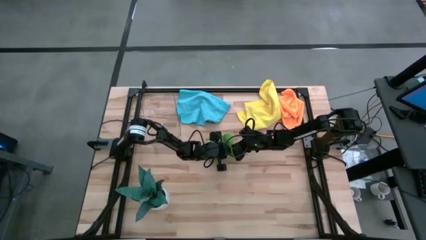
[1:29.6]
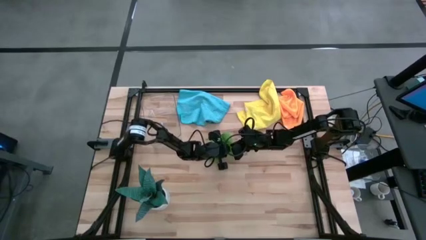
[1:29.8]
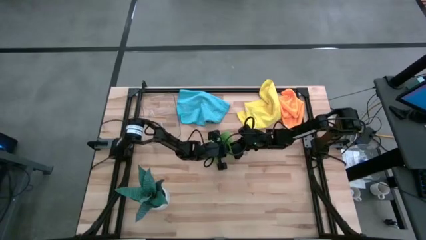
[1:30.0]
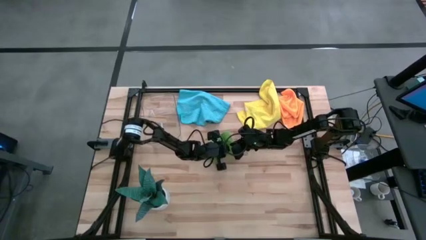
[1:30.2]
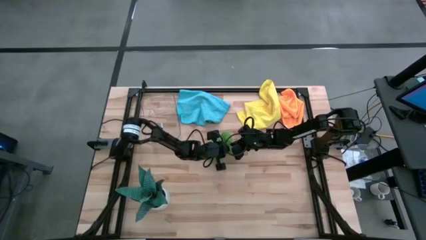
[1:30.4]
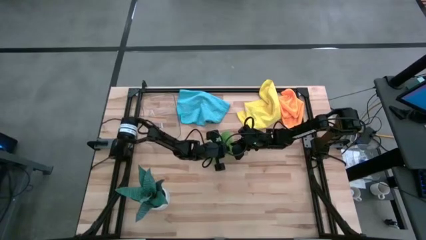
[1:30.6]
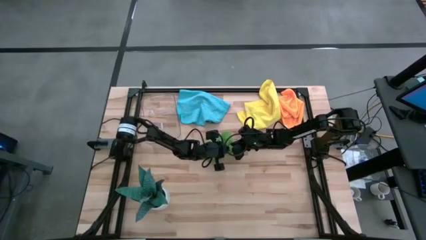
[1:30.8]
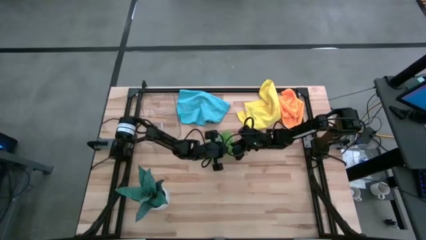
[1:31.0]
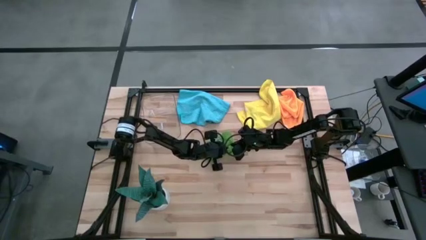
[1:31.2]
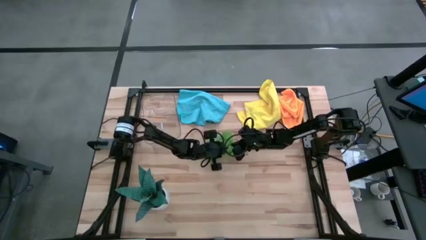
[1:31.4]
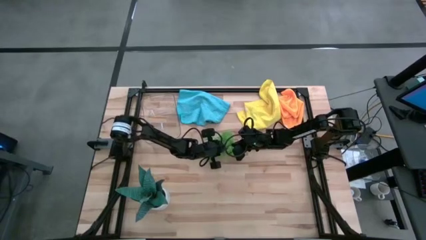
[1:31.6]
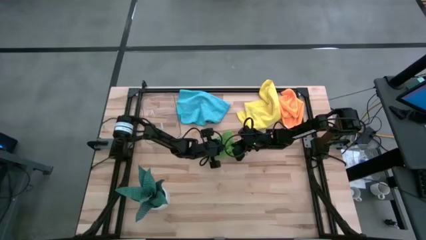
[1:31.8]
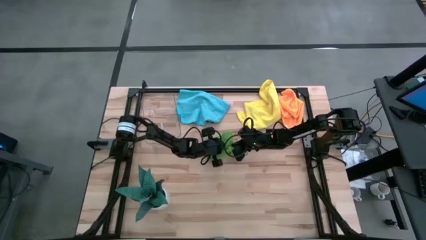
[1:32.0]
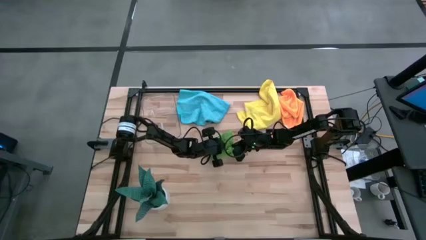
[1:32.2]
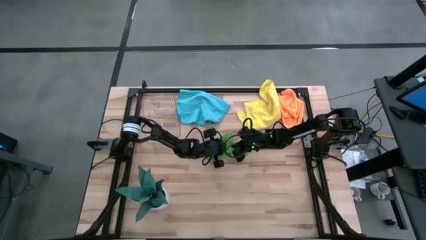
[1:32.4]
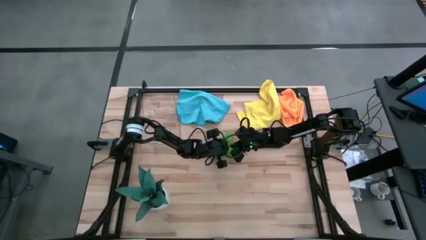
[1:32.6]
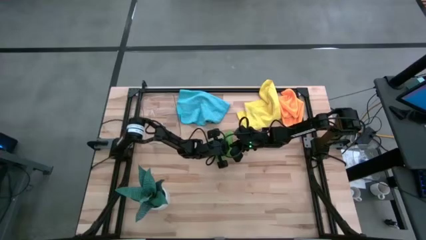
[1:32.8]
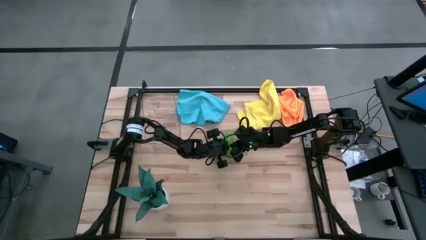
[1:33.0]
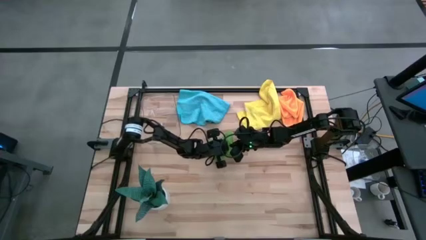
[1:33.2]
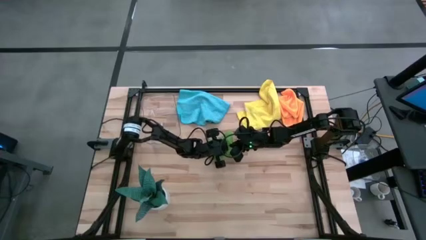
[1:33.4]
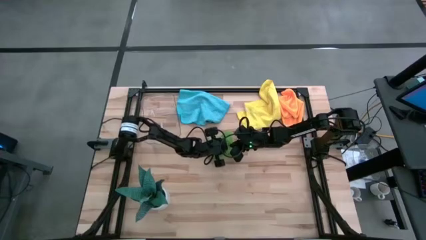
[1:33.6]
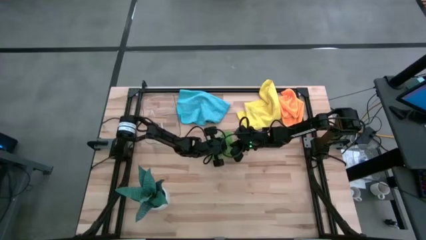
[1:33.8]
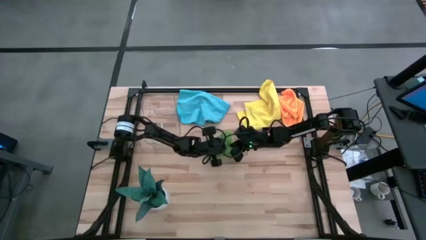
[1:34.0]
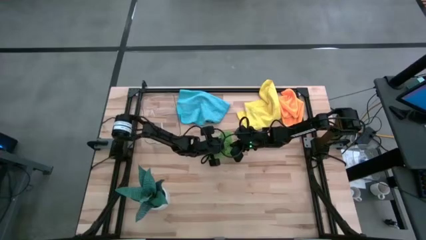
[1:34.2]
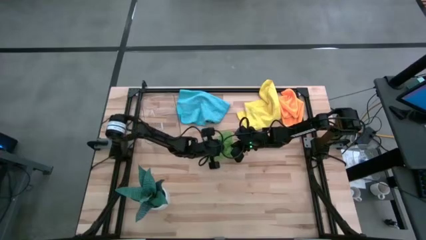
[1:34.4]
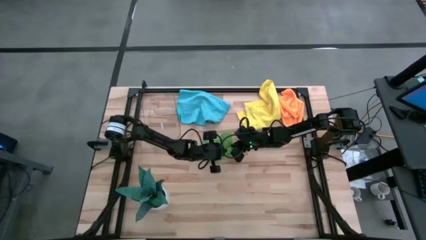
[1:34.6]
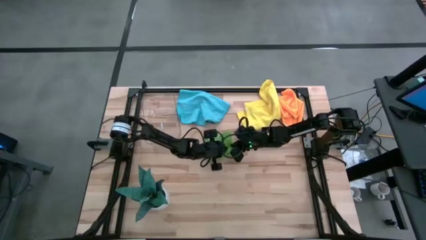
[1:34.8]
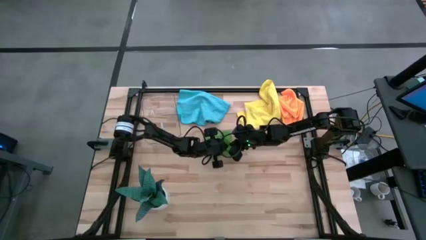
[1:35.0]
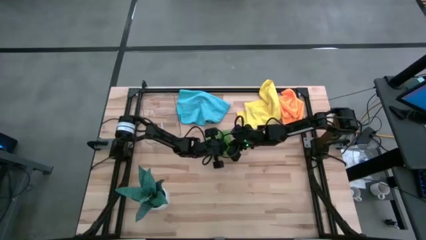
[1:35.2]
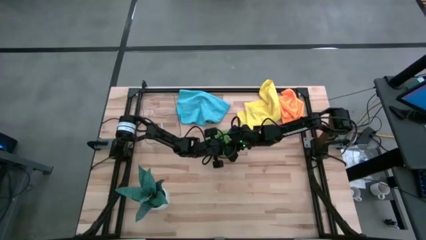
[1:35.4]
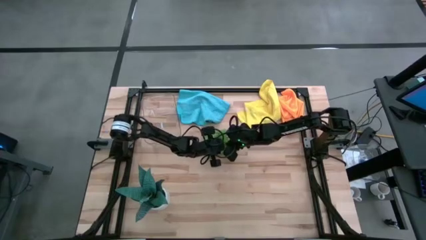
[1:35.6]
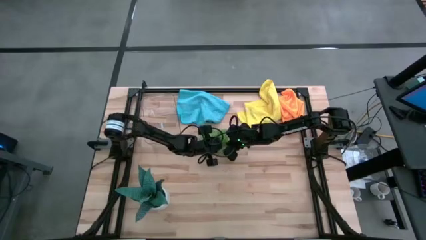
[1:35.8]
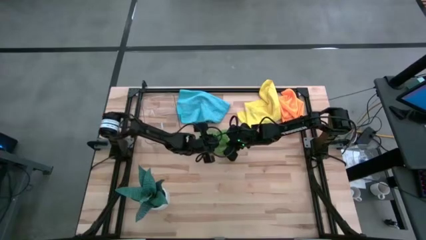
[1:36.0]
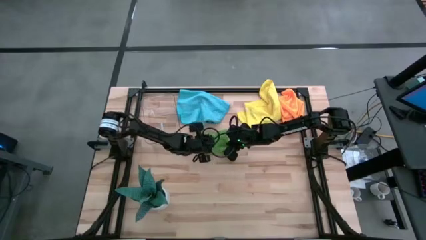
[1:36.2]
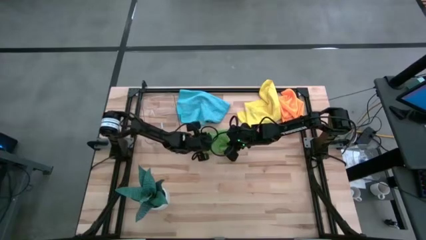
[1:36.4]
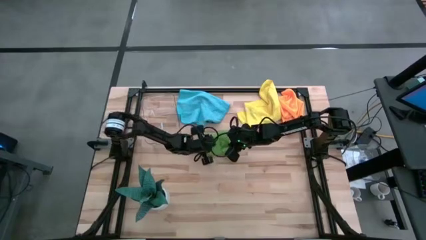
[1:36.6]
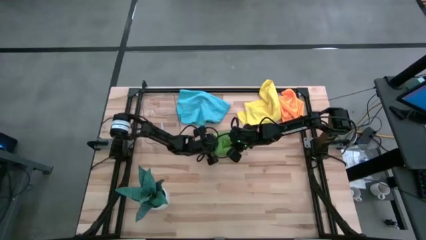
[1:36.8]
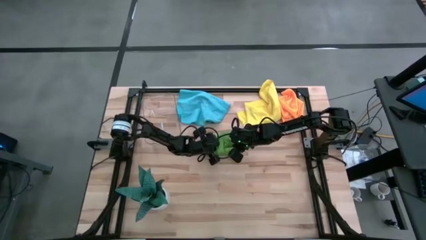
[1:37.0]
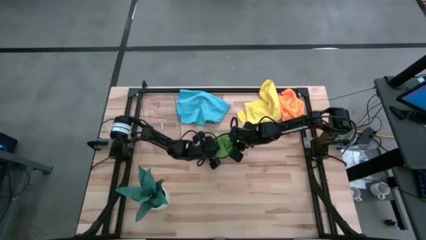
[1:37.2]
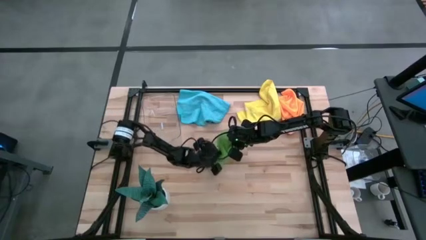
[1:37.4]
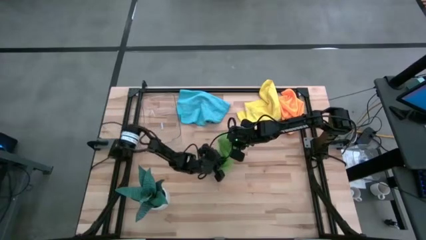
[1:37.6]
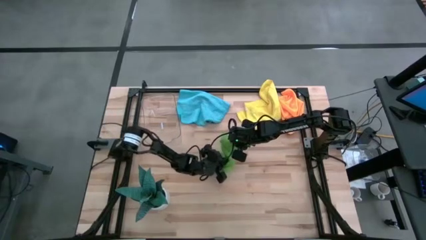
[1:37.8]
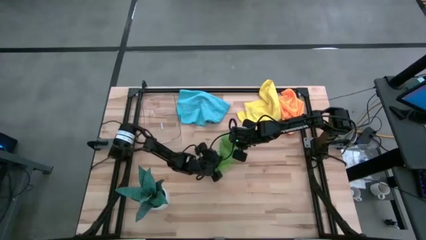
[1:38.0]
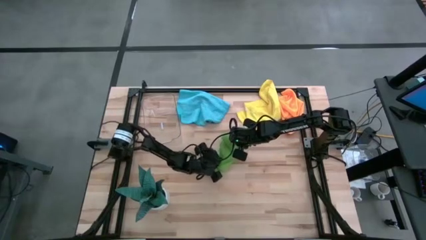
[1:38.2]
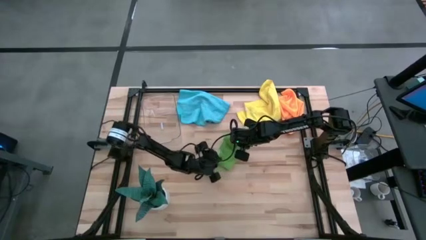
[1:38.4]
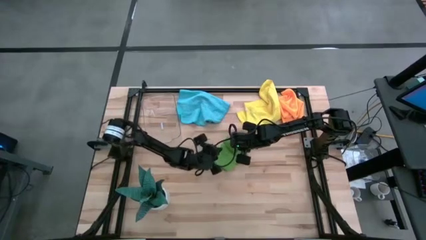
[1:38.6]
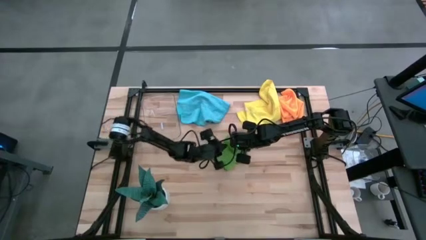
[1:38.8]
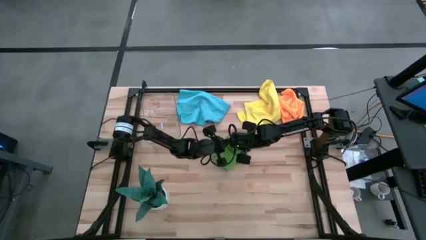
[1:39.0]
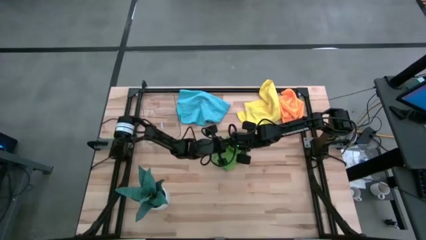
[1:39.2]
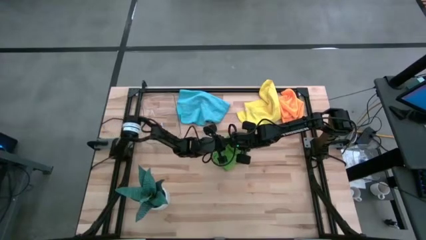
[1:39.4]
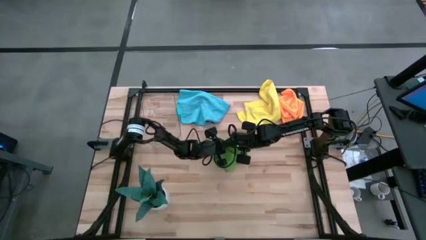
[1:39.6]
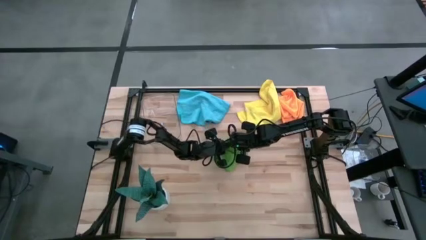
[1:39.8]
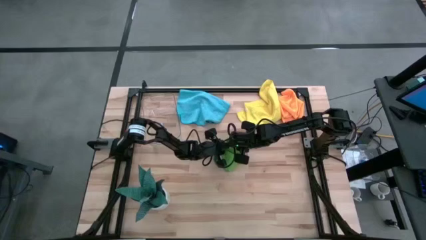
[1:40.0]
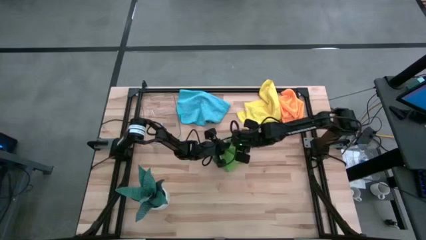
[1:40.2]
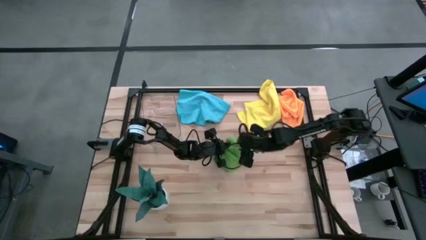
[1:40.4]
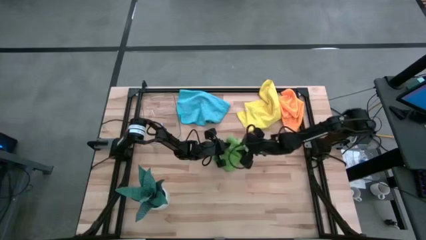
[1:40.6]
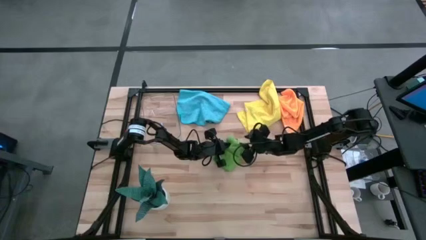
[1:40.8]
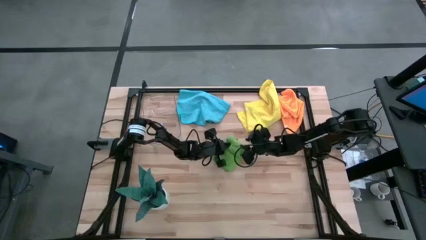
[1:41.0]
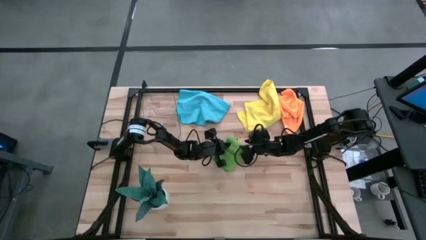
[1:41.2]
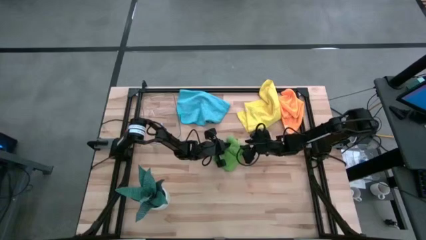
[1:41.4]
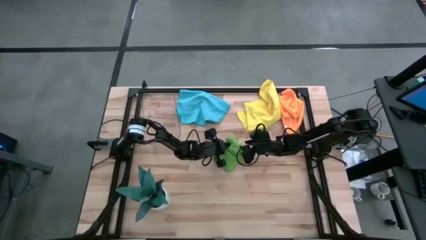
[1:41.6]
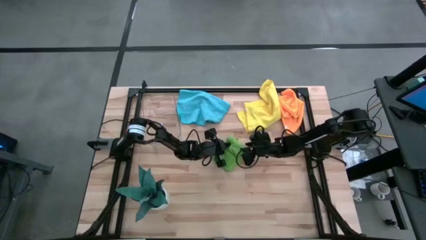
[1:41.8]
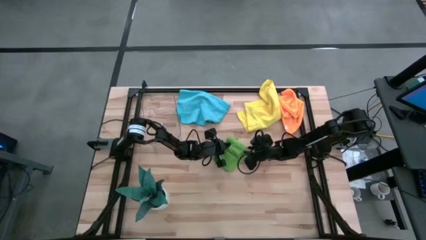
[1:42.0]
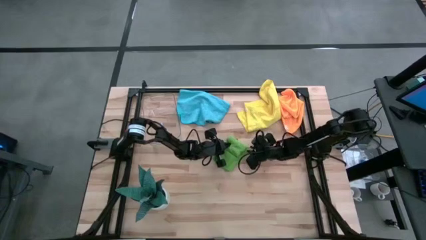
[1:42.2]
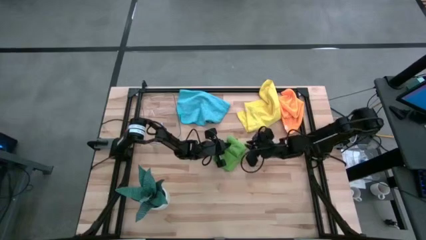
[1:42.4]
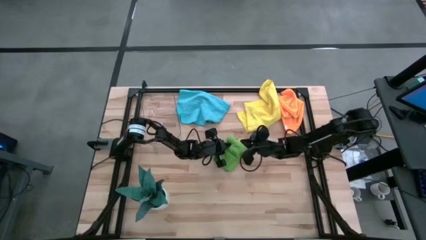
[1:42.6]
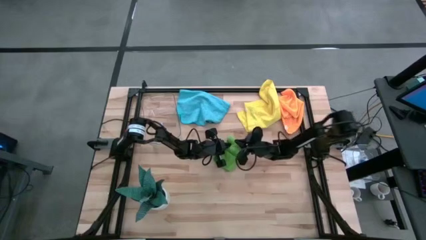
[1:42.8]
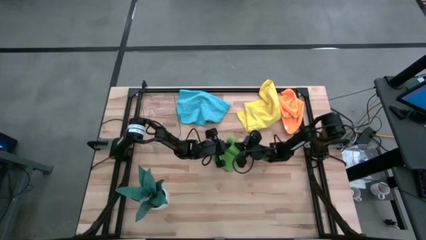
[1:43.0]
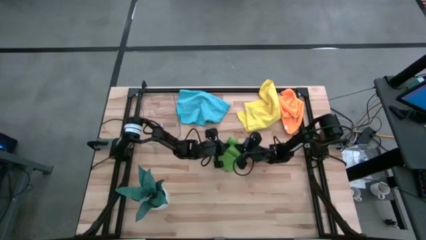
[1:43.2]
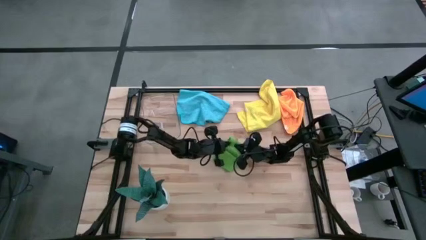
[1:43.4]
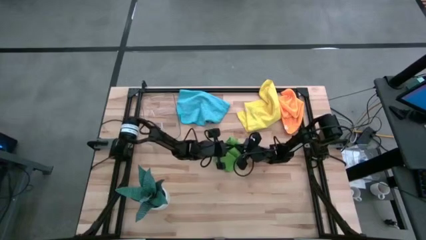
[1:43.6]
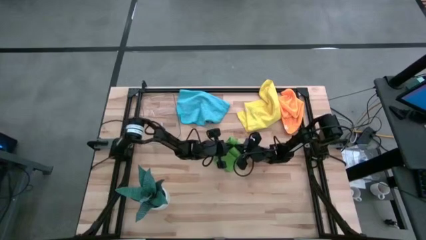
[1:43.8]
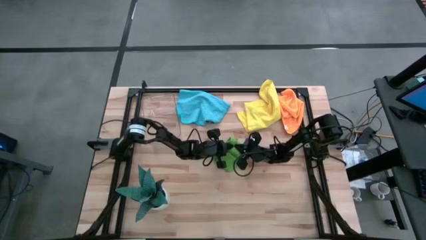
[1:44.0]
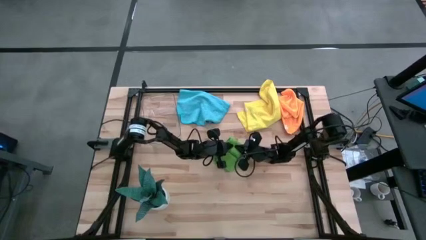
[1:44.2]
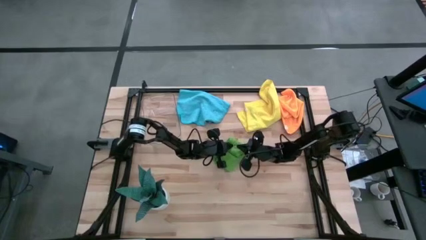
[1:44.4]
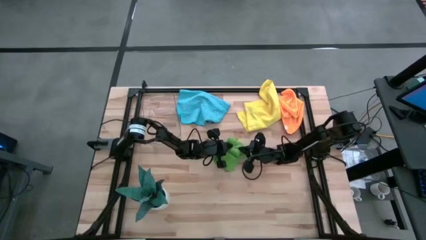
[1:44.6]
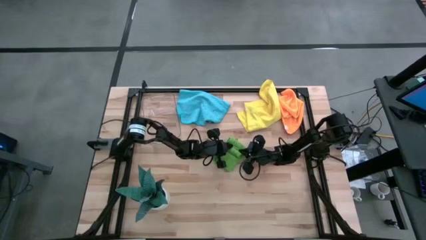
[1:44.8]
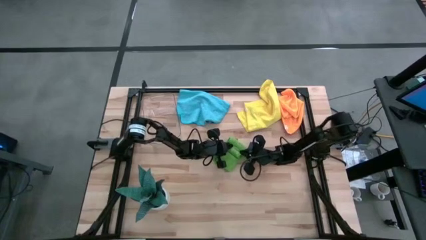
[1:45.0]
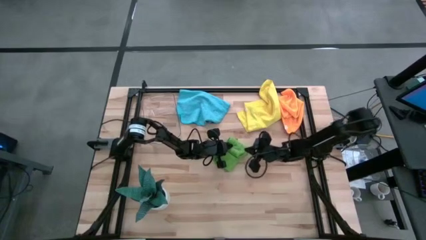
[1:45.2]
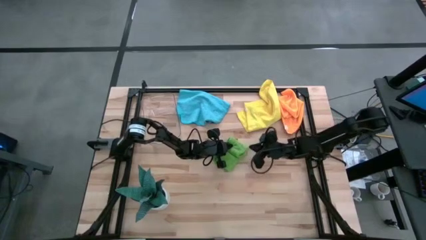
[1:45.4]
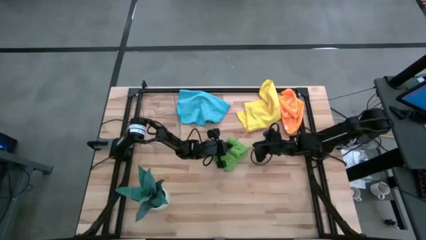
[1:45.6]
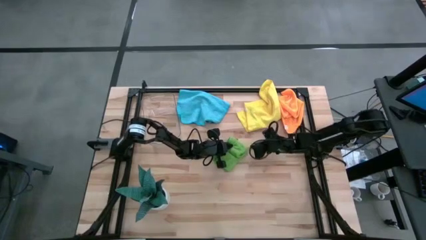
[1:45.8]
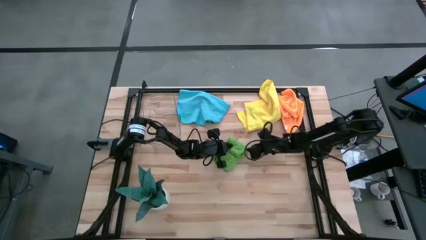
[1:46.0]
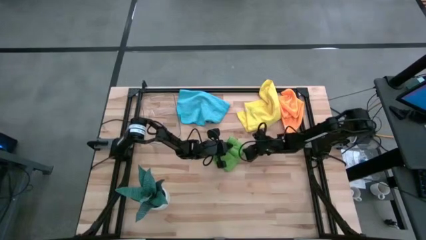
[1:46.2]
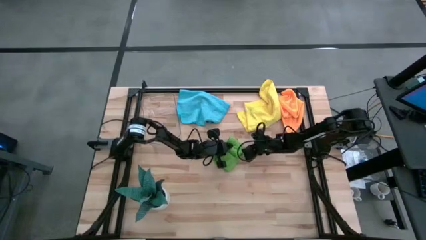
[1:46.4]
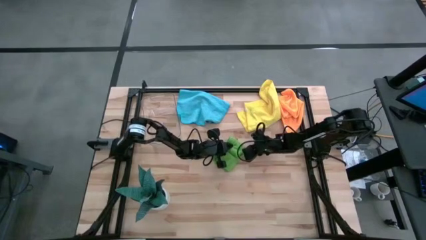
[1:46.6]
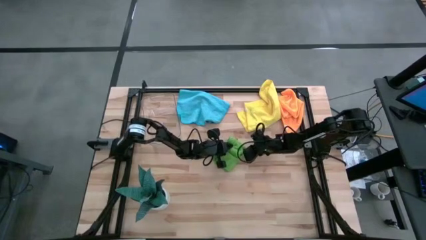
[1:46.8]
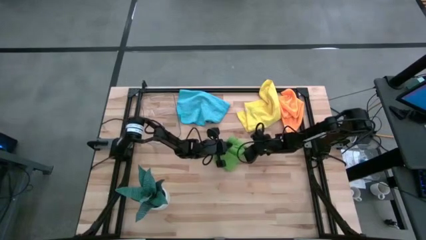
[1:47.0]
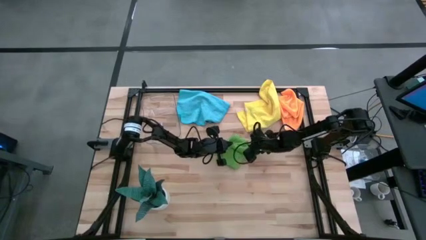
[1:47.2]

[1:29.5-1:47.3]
Task: Roll microfiber towels into tight, uniform cylinder then place into a basket
Roll the green microfiber towel
